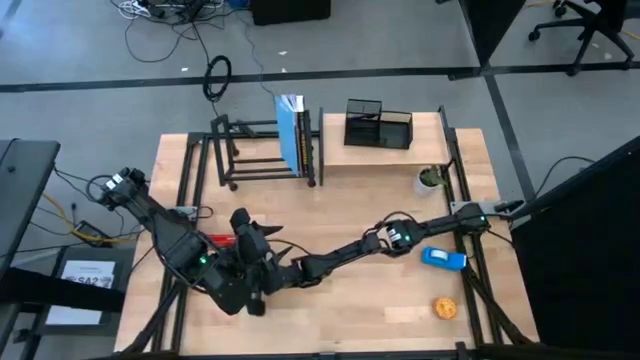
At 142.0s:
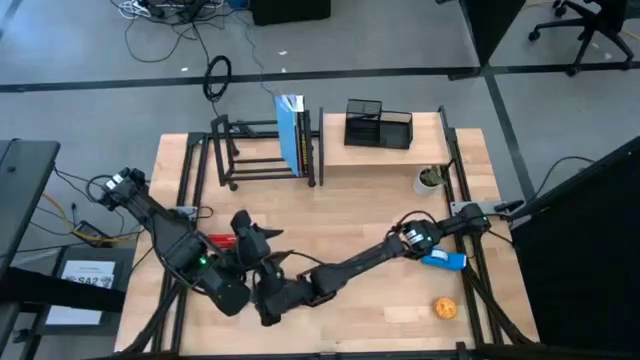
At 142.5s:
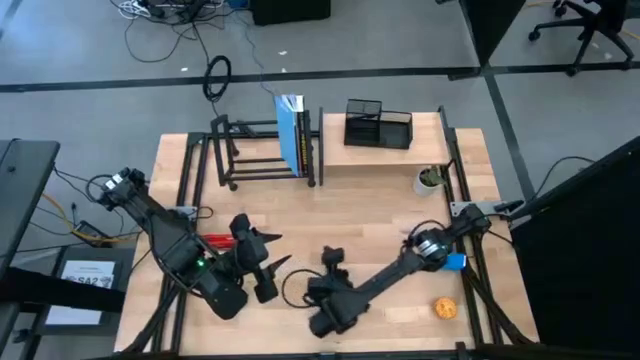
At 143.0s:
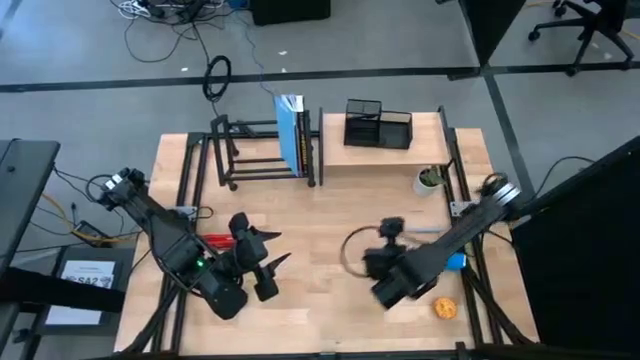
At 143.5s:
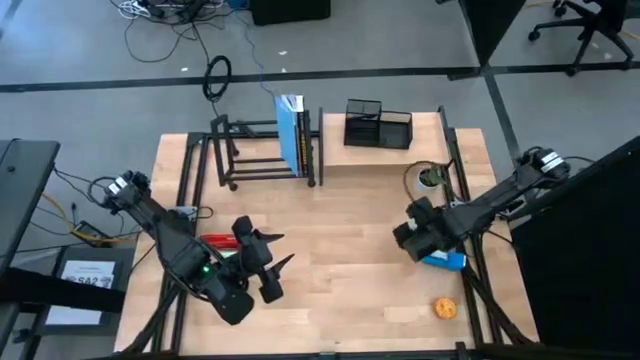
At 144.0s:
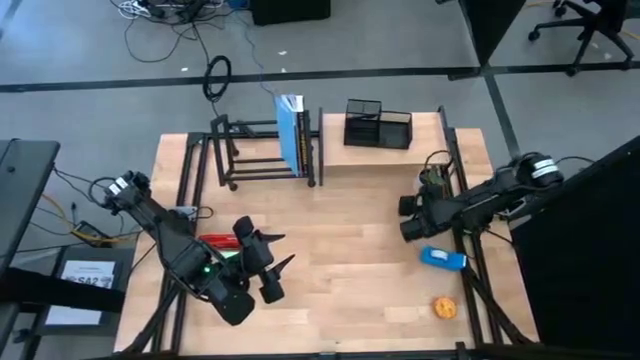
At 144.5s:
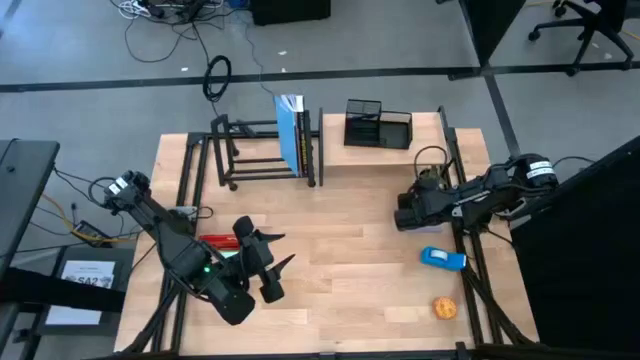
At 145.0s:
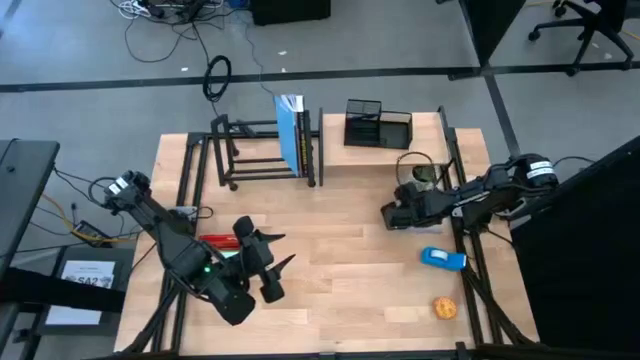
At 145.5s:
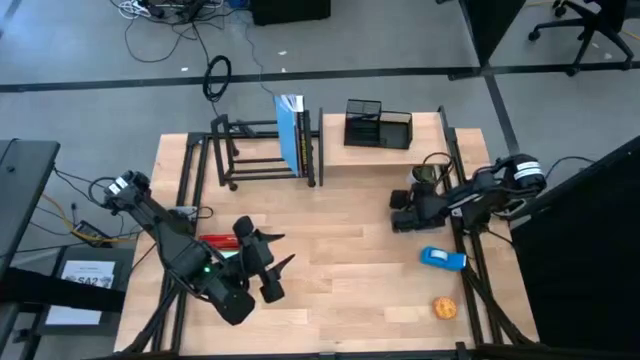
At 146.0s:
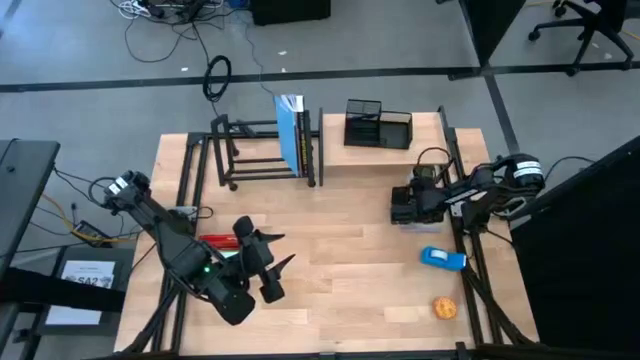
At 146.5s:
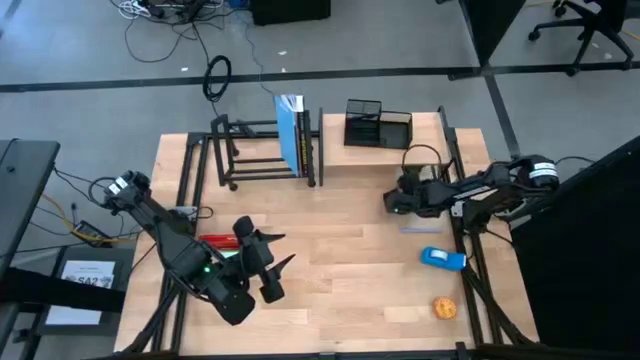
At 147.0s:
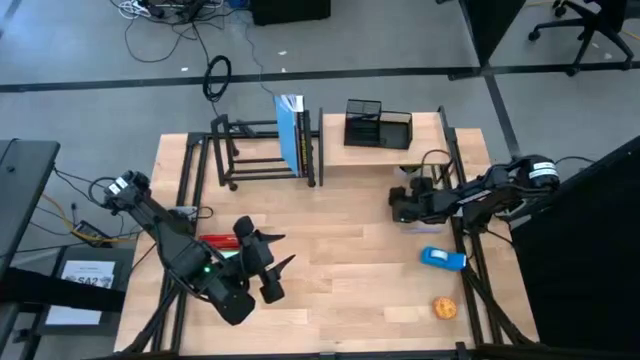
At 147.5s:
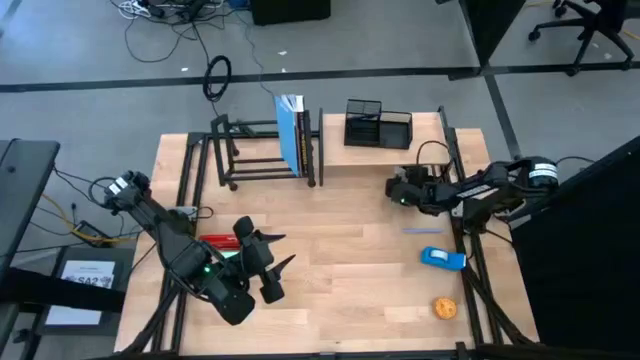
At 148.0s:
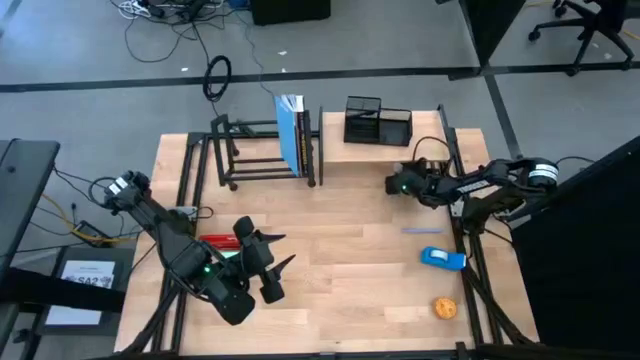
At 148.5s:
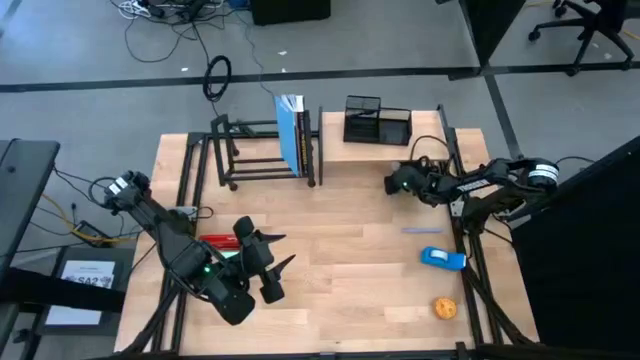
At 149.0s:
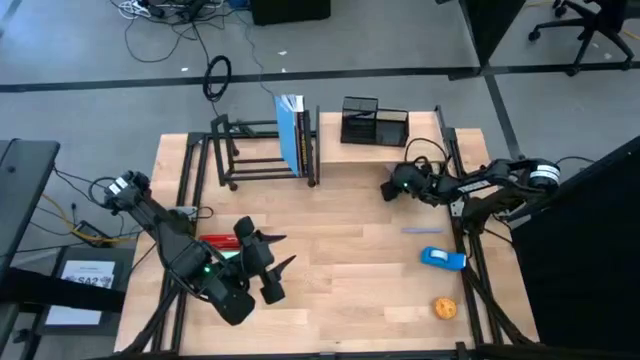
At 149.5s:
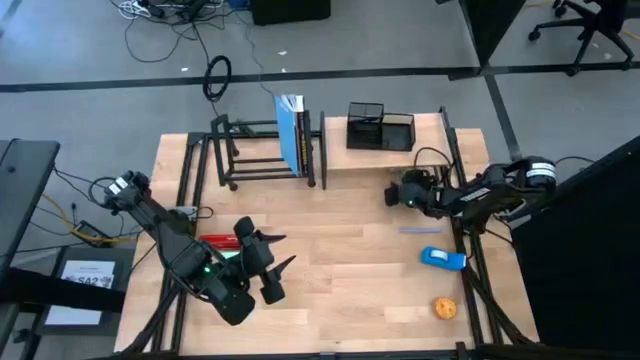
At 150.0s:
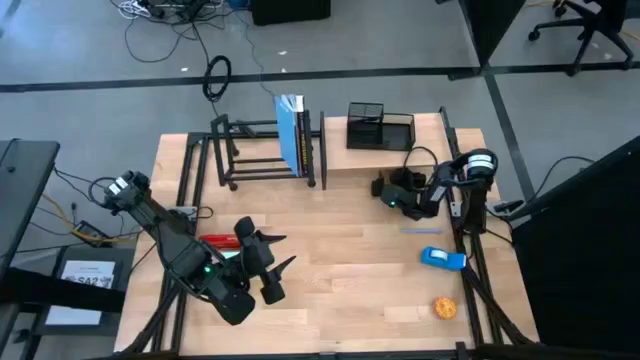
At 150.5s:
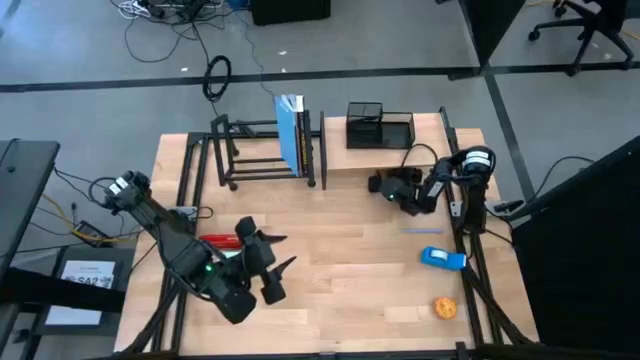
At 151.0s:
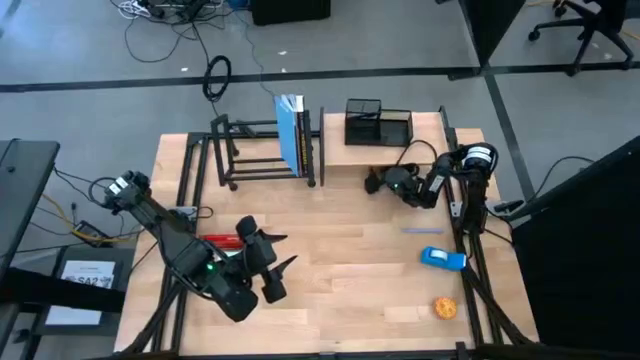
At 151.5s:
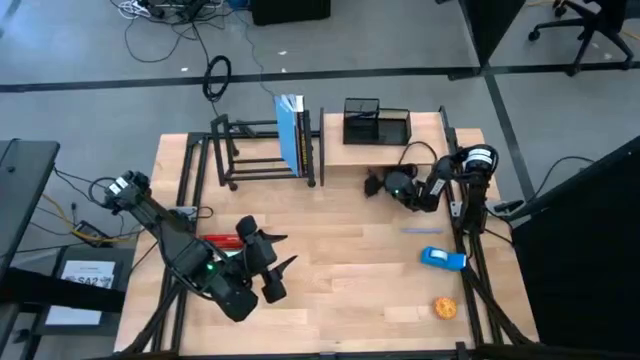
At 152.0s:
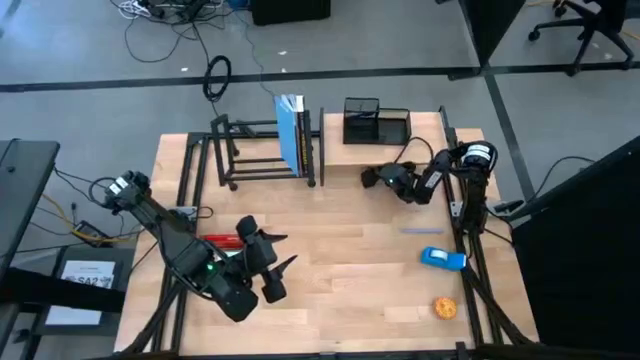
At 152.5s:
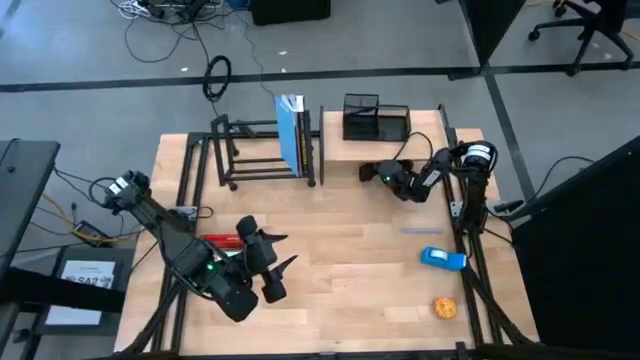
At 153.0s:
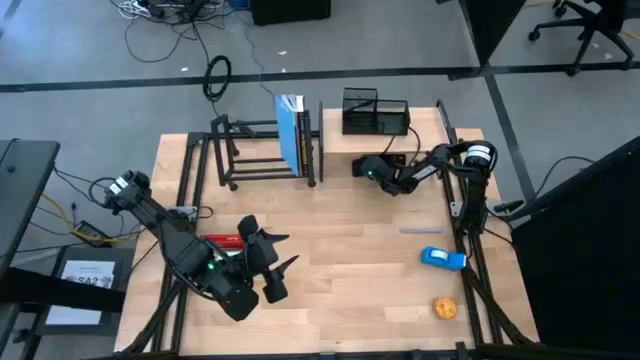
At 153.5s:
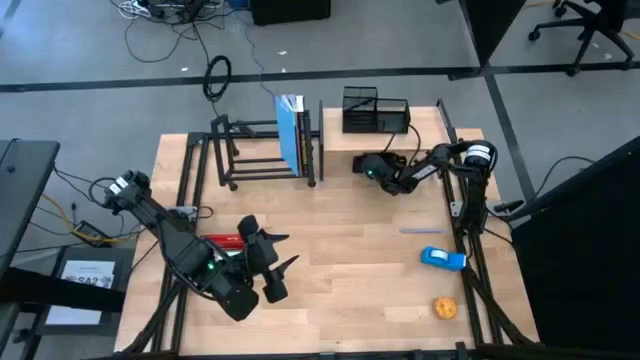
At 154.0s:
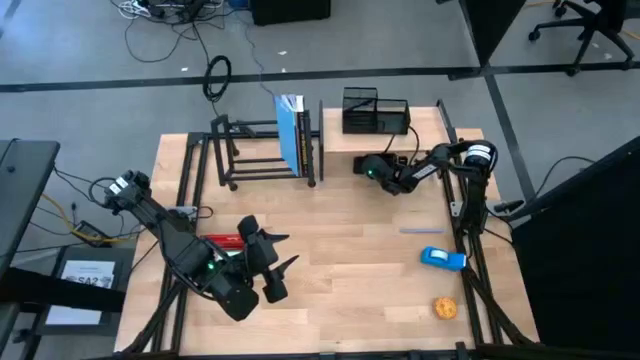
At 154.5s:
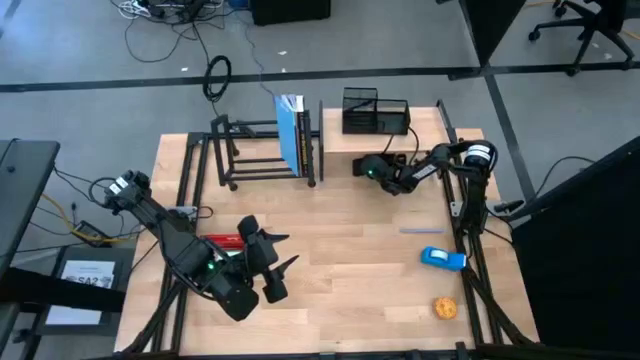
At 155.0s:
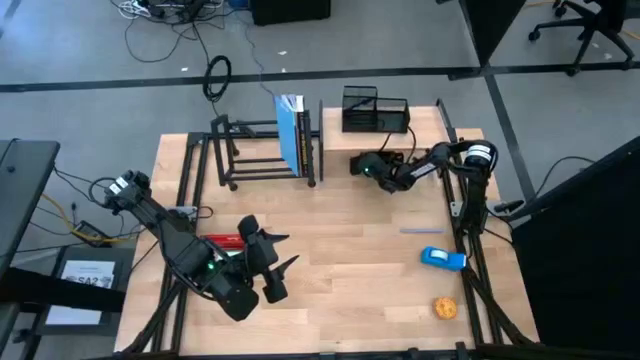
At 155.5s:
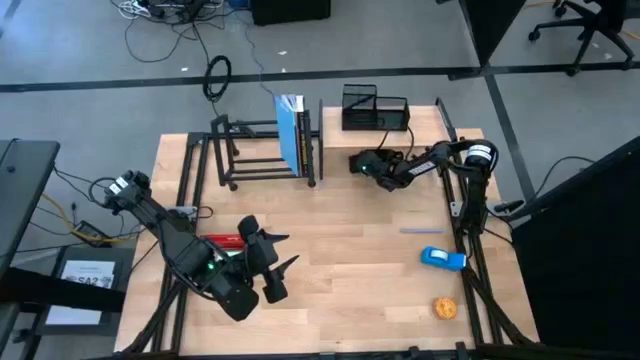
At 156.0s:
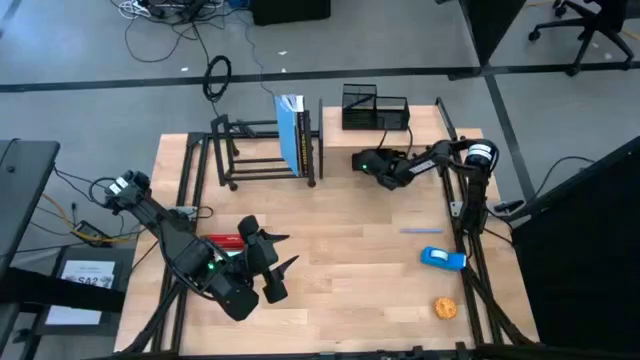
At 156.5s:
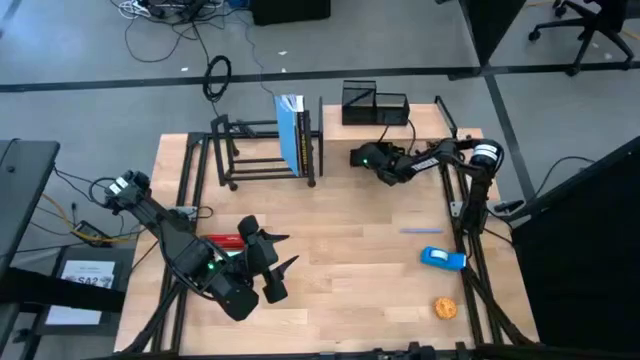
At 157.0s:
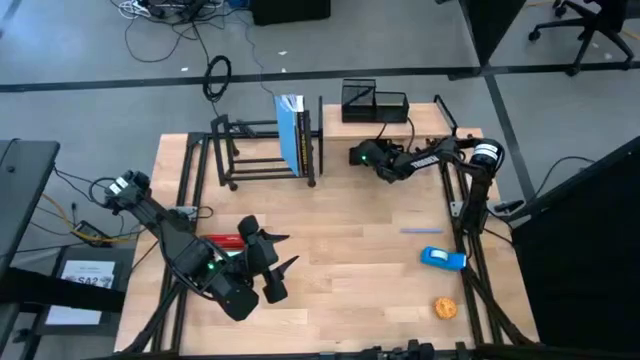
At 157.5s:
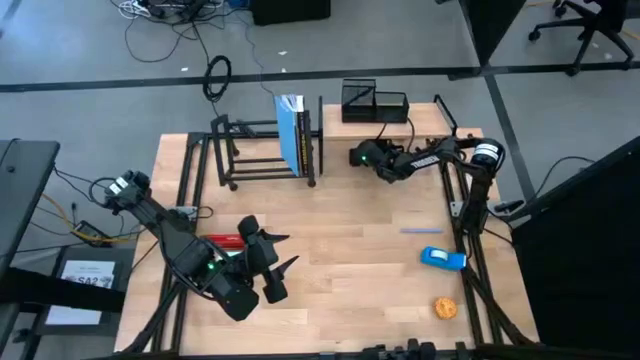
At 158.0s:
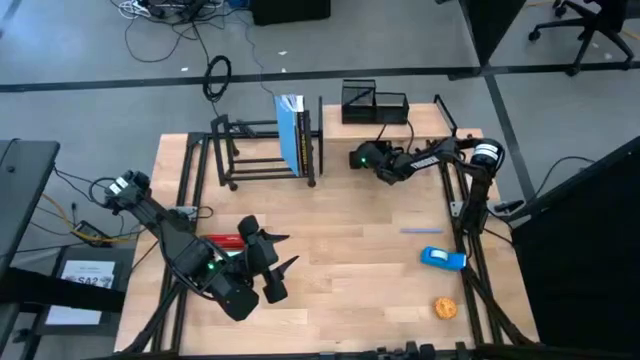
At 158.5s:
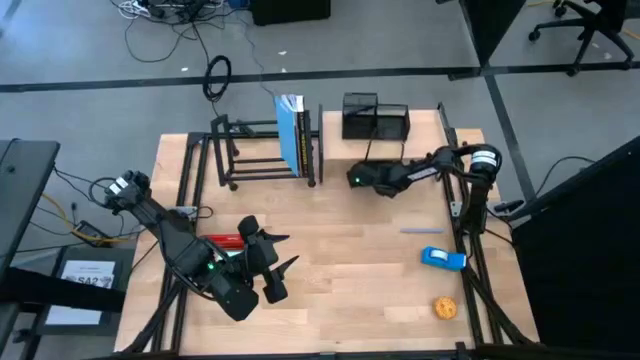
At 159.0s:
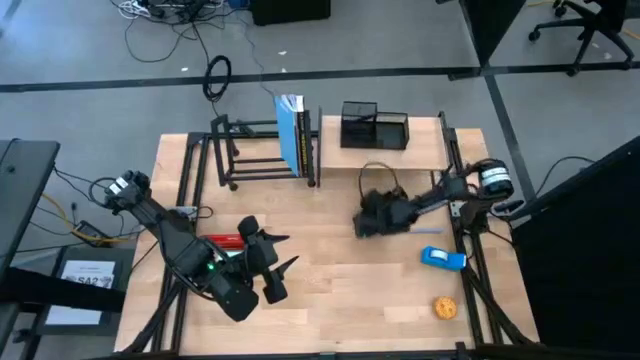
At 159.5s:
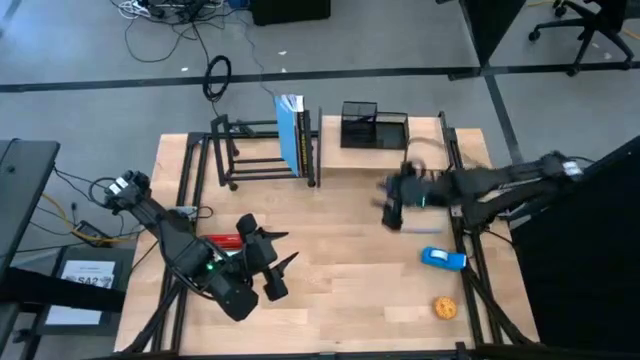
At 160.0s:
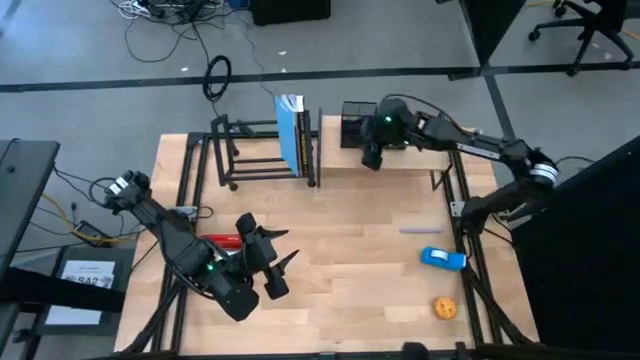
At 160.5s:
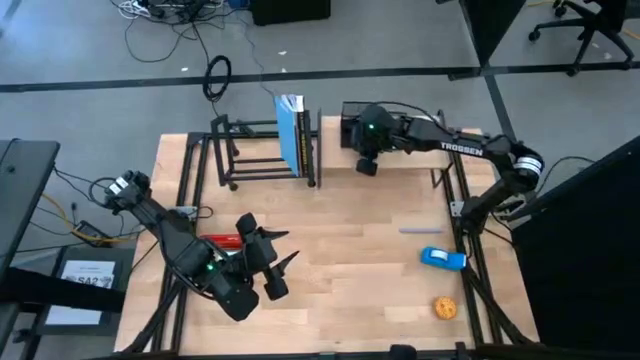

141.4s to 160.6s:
Task: Stock shelves
Remove the white vase plant from under the shelf

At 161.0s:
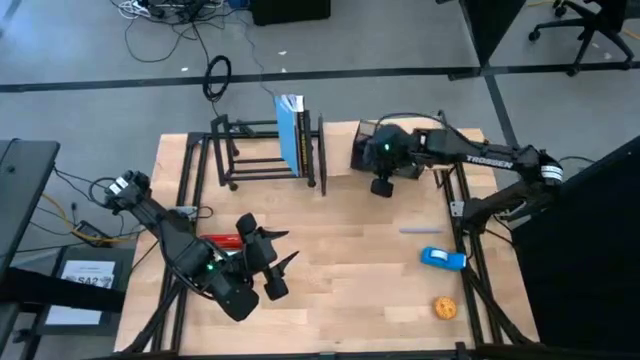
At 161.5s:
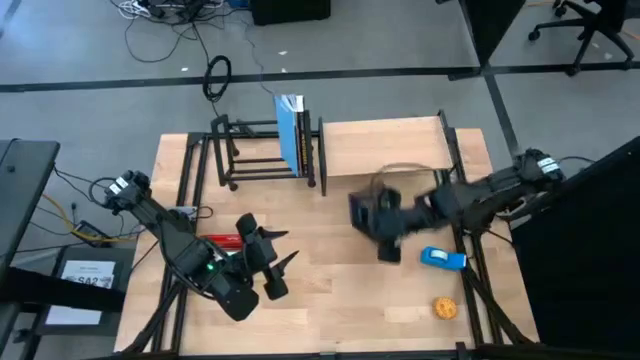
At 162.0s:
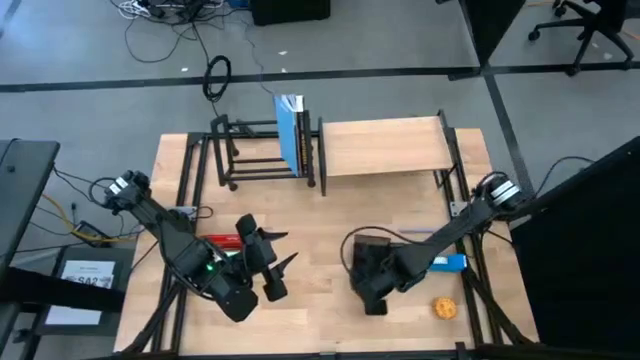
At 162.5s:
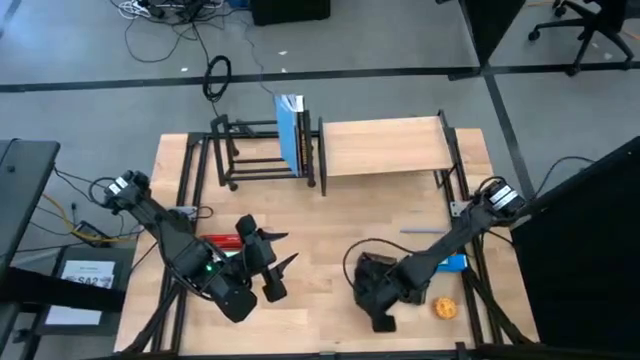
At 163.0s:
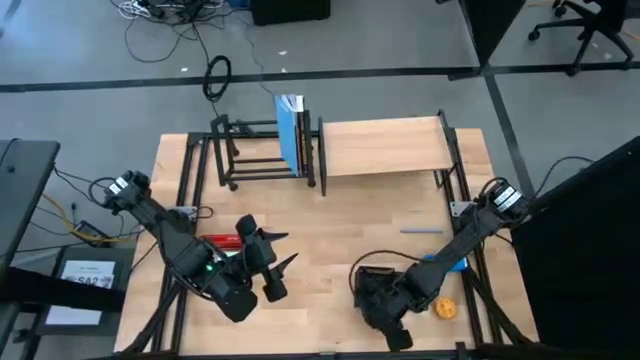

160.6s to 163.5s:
Remove the pen organizer from the shelf
